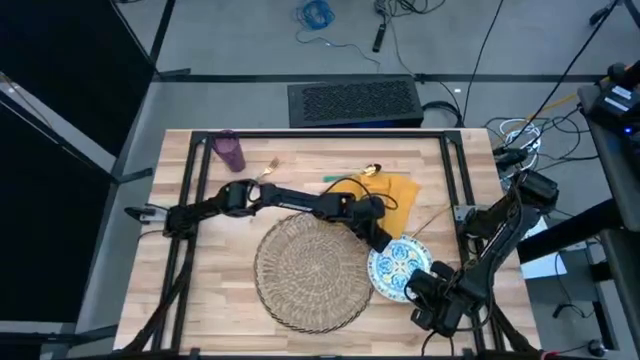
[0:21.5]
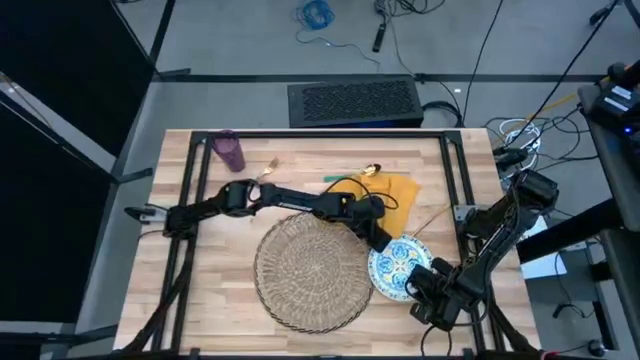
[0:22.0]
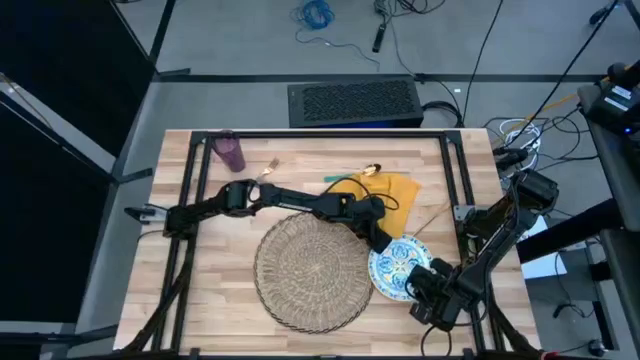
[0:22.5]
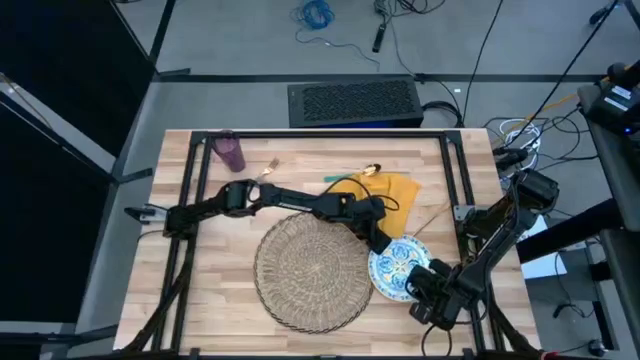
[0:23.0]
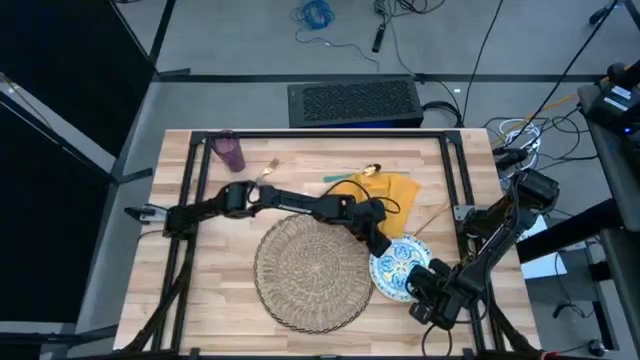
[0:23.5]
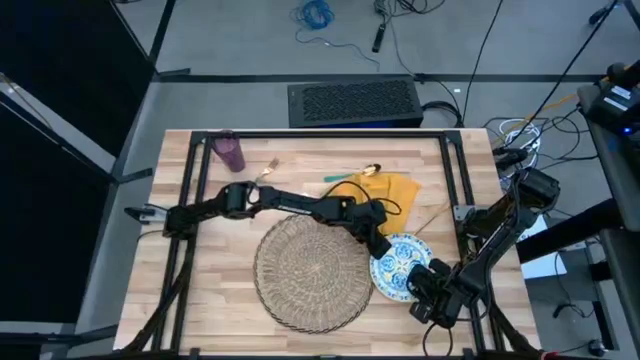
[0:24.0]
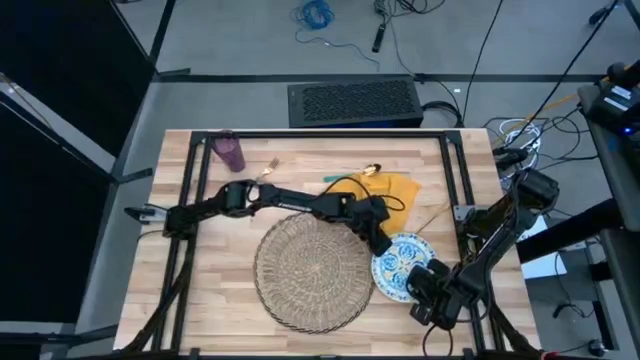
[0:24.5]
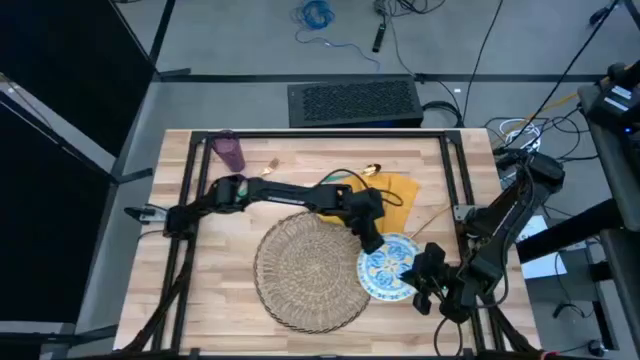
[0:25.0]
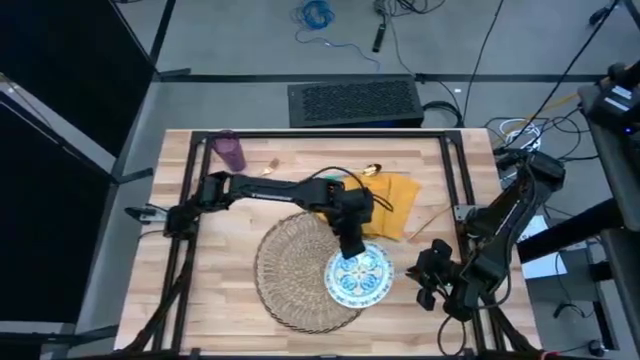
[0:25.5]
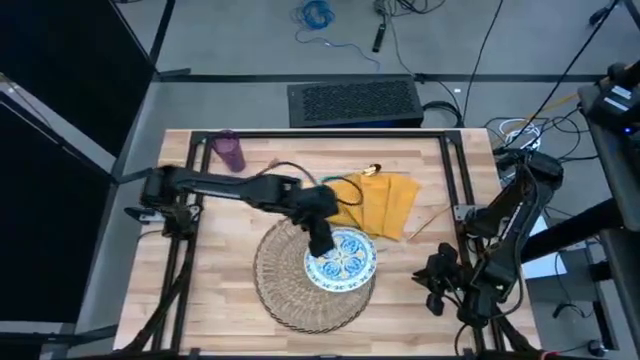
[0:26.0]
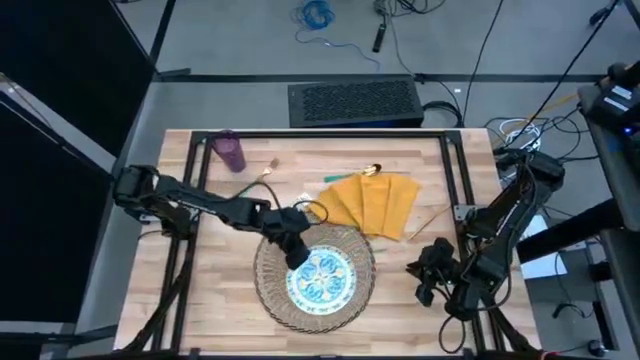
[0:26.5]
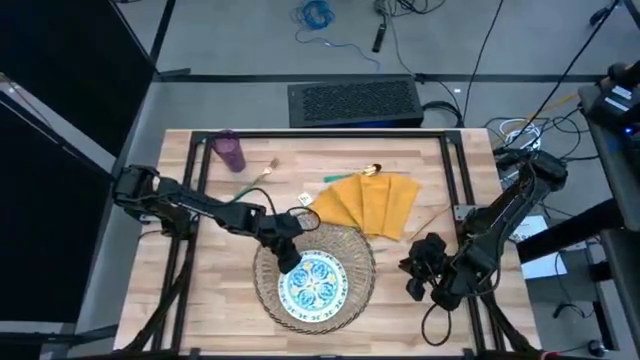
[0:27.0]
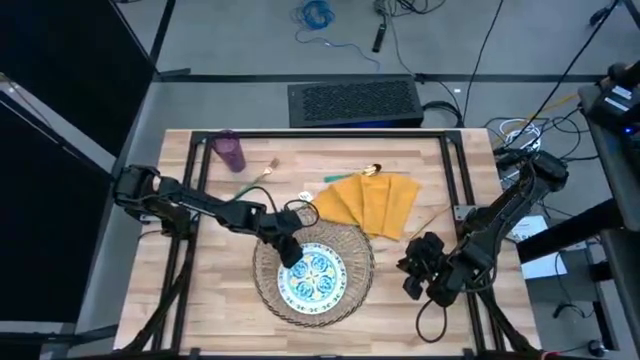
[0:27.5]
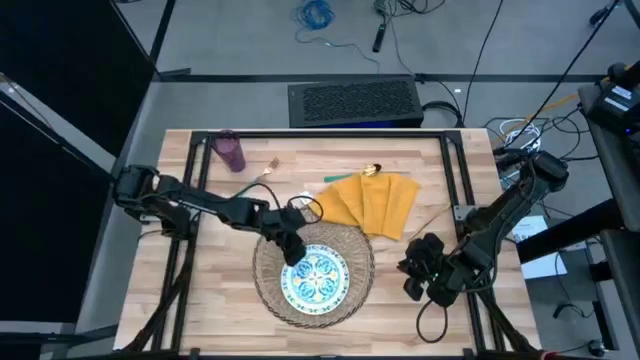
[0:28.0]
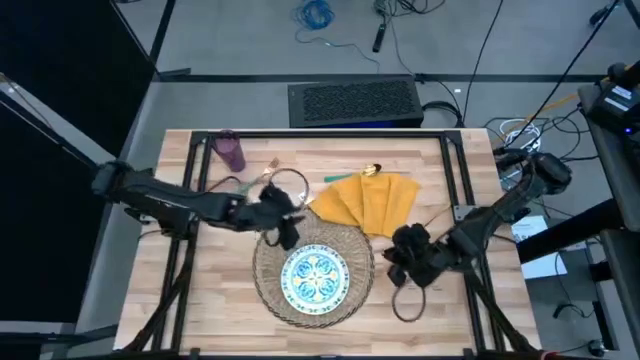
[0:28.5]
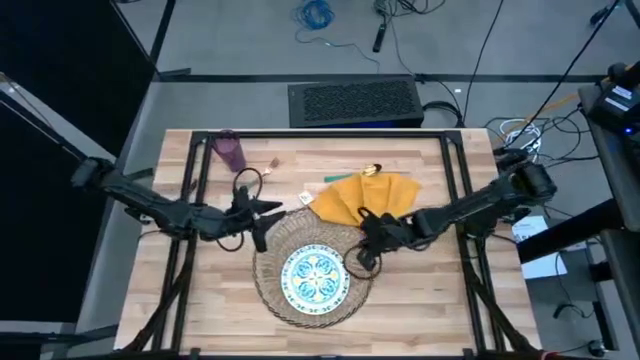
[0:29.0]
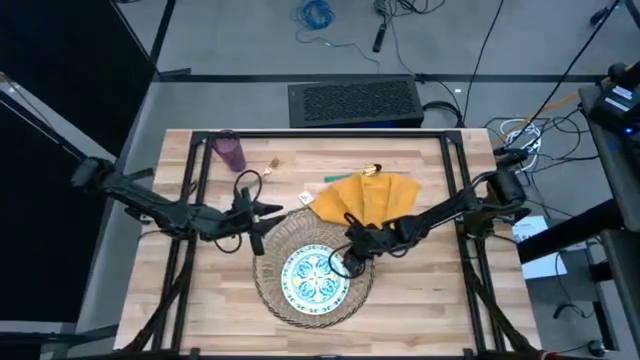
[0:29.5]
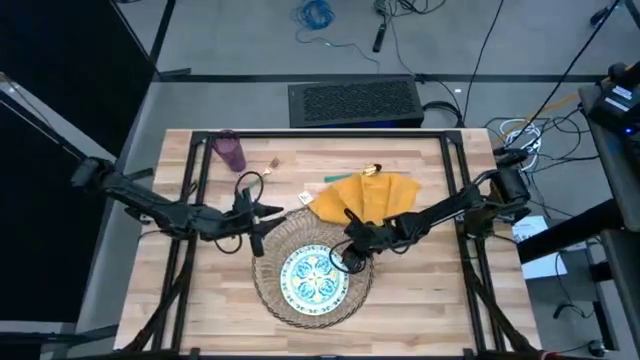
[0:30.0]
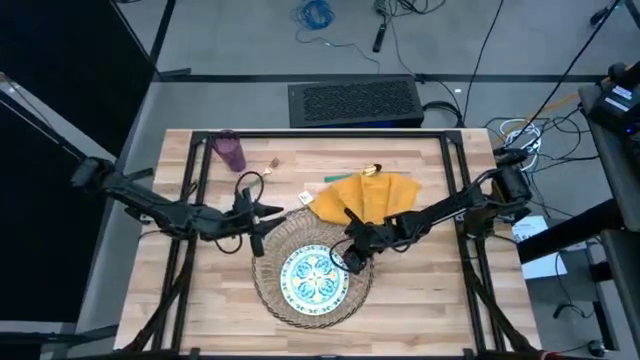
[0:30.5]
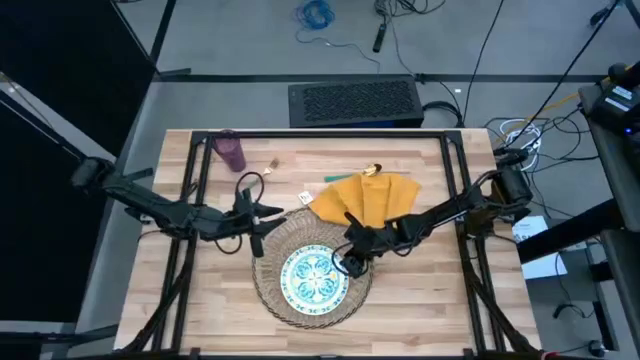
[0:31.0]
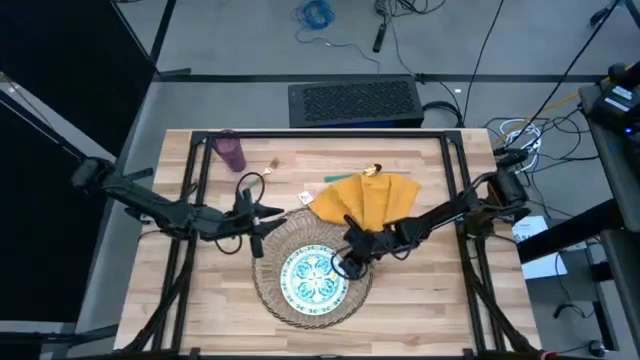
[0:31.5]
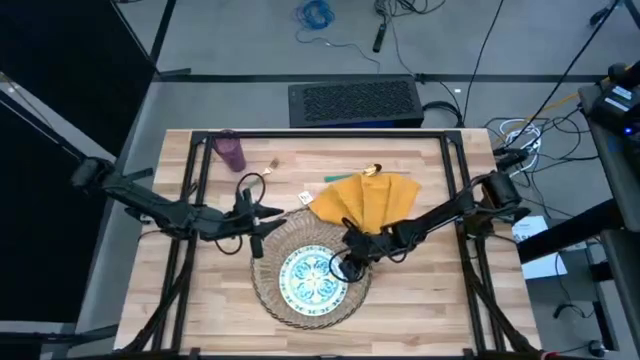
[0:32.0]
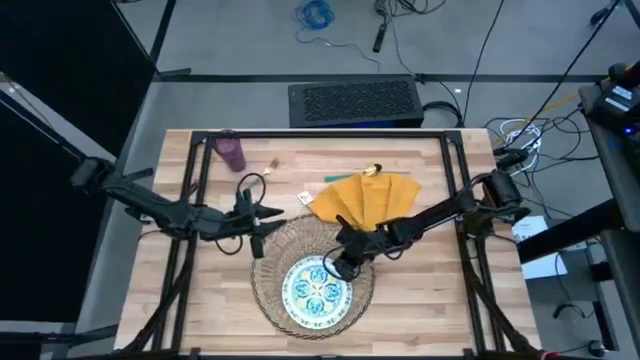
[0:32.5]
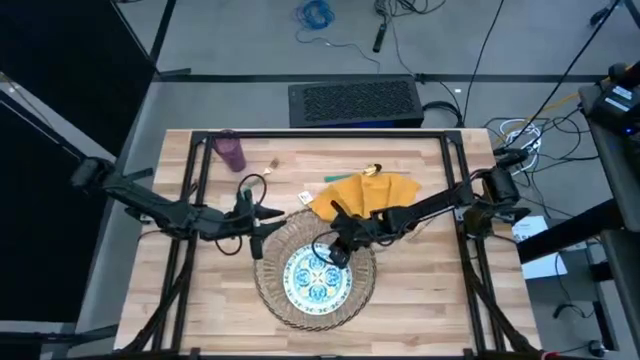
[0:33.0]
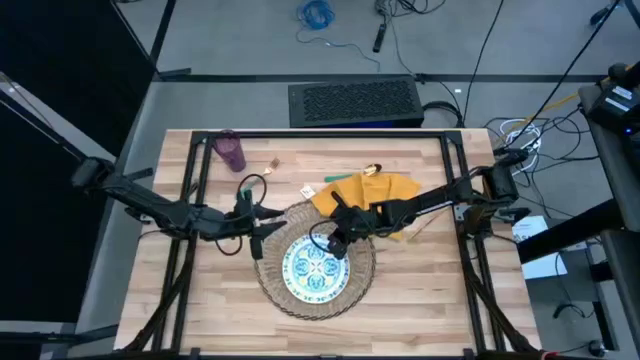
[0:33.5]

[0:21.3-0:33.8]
Task: Set table place
Put the blue patterned plate on the brown tablemat

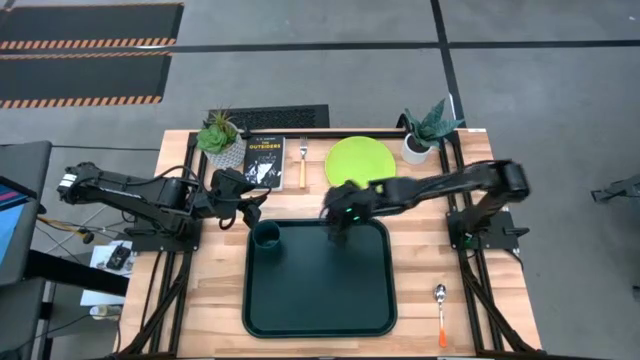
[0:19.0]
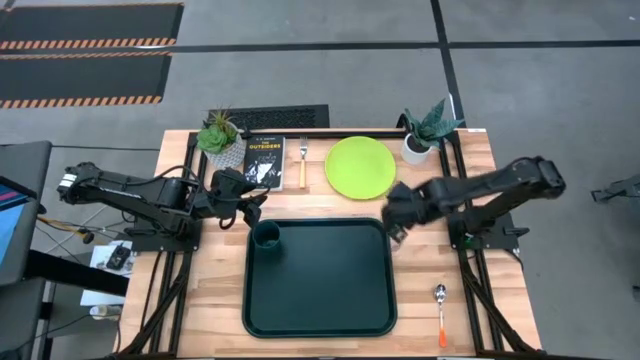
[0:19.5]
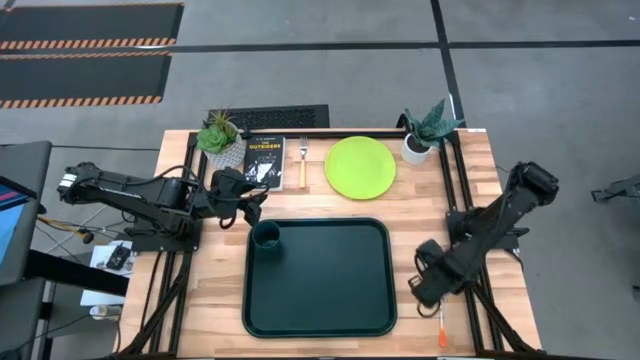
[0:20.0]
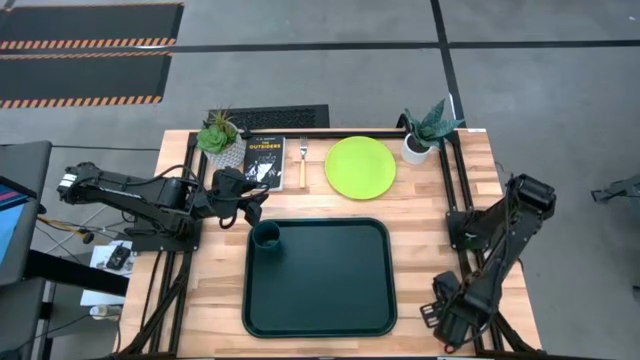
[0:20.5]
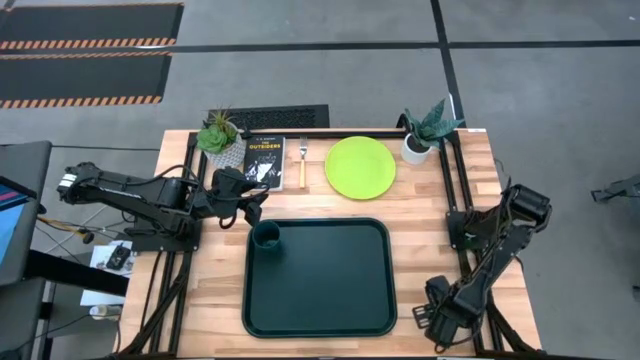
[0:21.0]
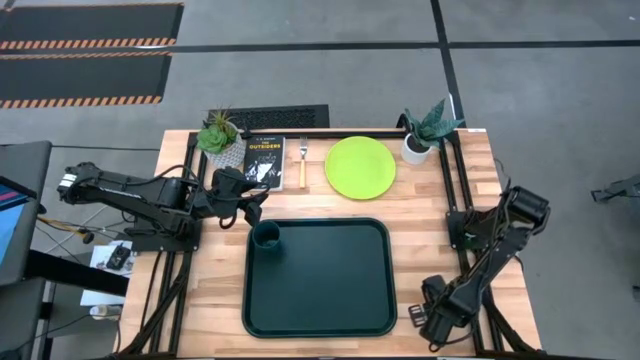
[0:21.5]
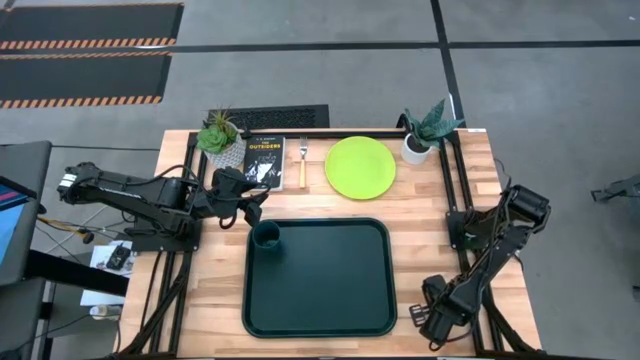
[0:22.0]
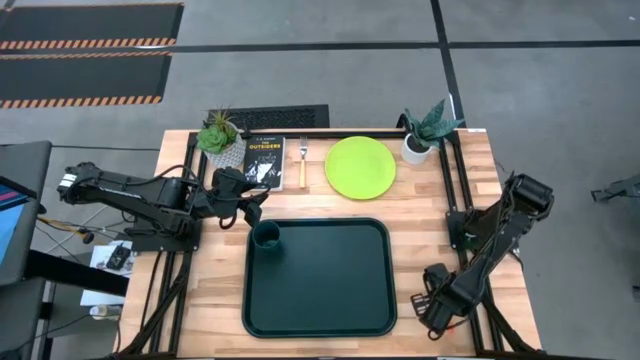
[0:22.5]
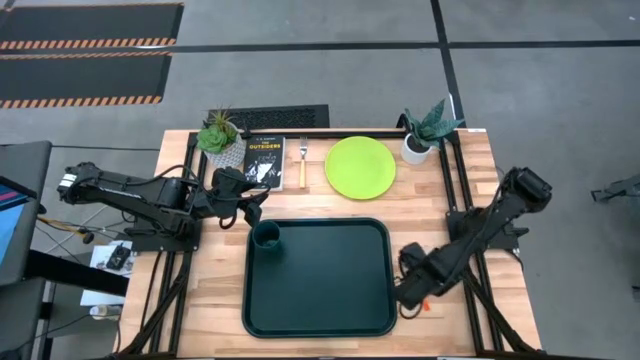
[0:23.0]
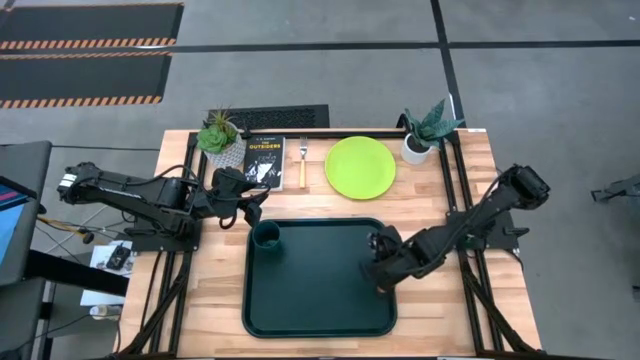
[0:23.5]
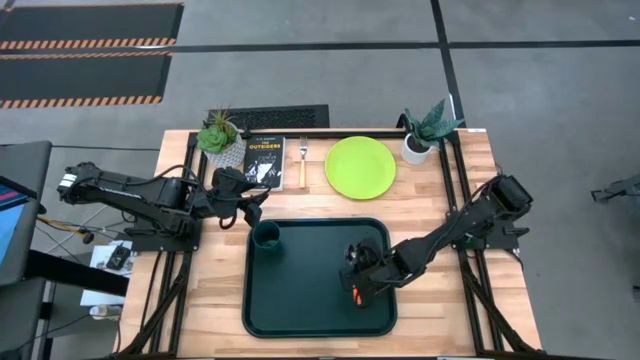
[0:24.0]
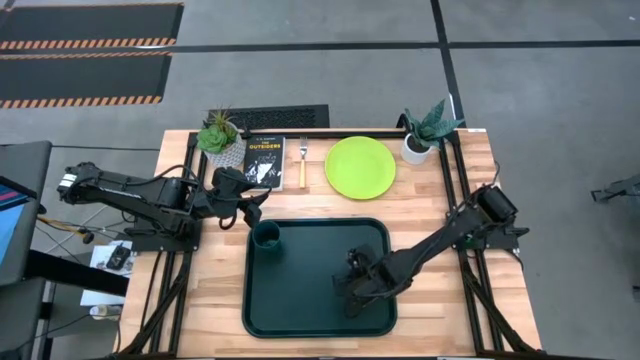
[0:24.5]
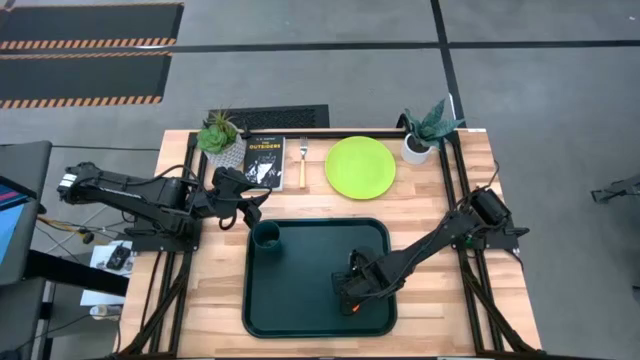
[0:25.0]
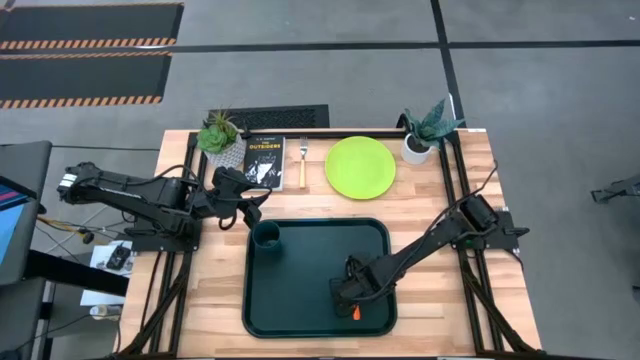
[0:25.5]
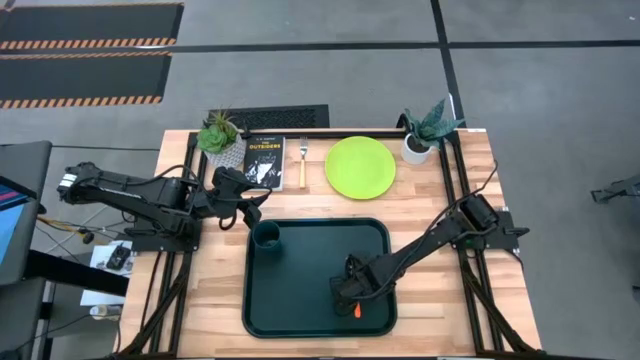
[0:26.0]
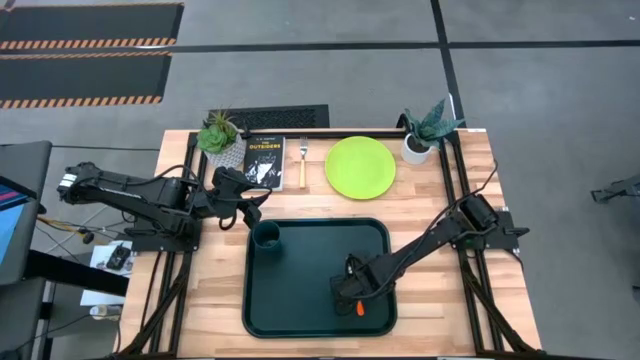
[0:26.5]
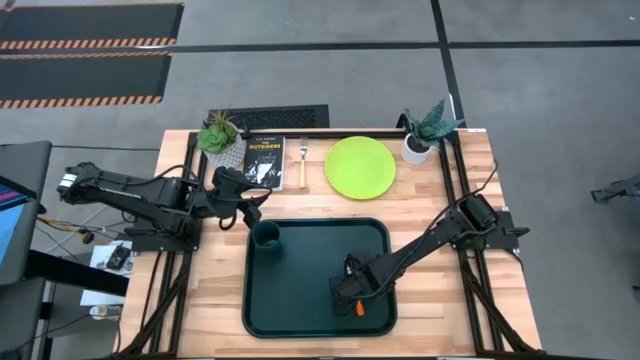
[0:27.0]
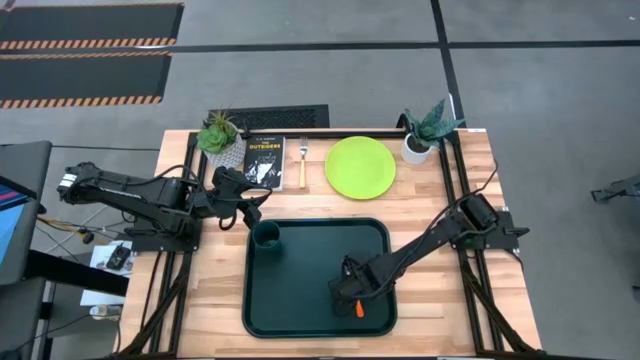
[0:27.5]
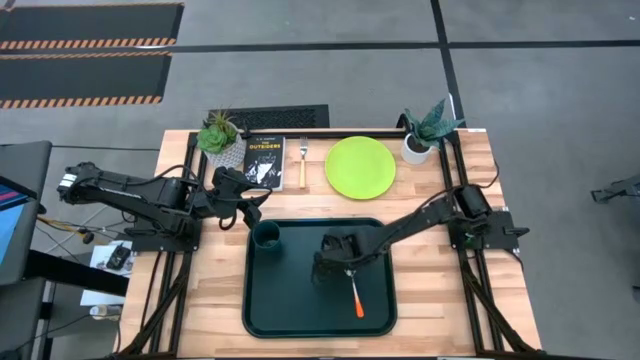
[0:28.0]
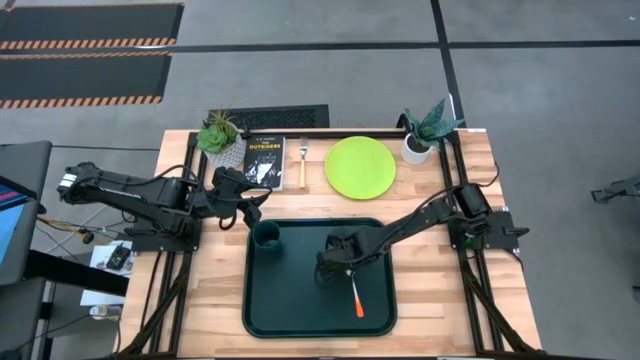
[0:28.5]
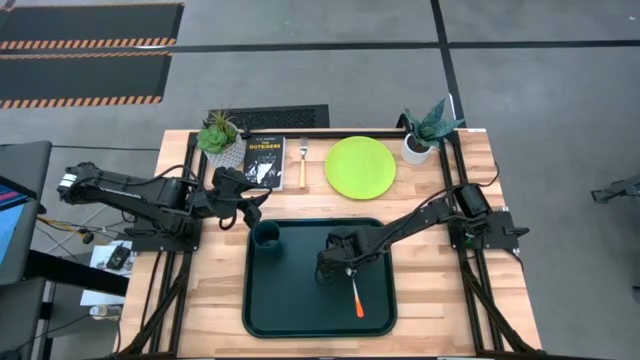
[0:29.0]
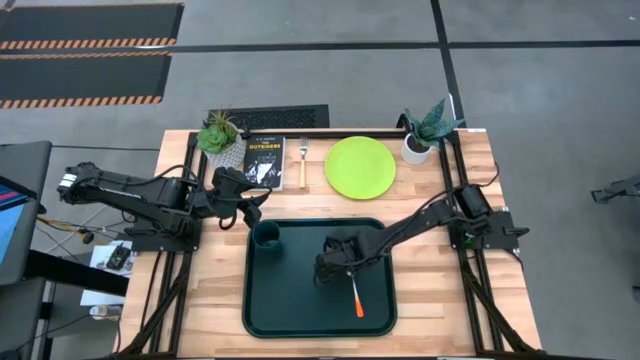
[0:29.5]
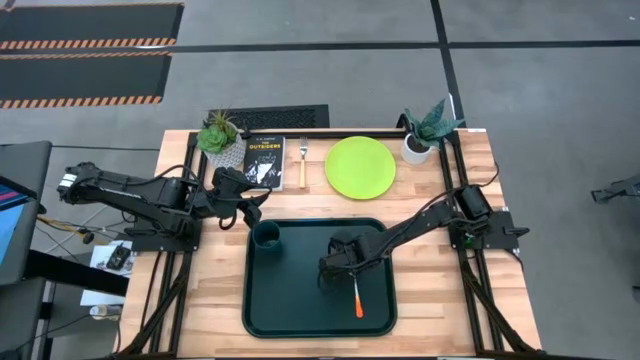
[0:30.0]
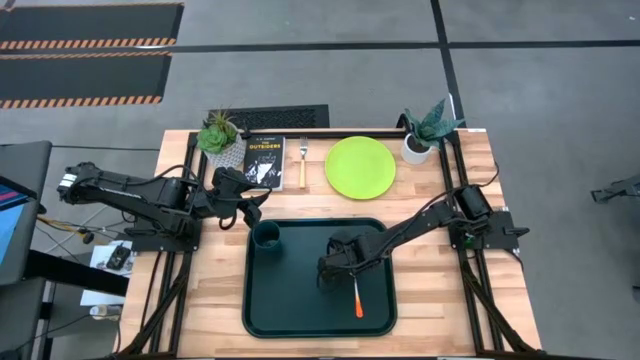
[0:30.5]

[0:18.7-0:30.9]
Task: Pick and place plate/cup/fork/spoon on tray
Put the spoon onto the black tray
